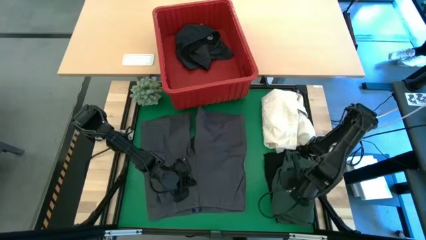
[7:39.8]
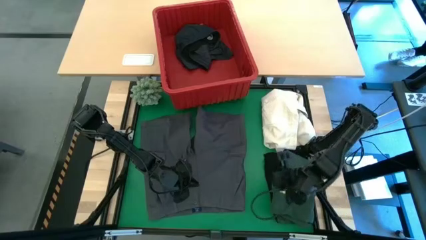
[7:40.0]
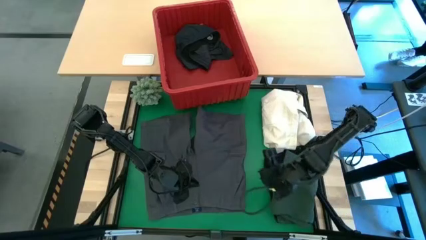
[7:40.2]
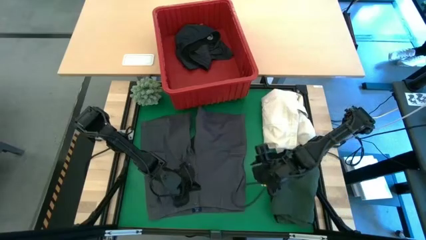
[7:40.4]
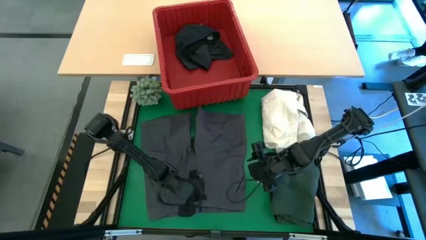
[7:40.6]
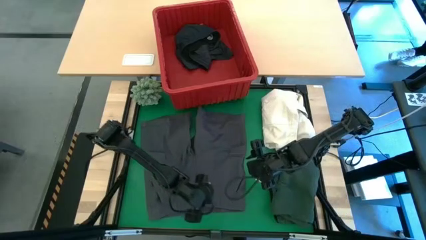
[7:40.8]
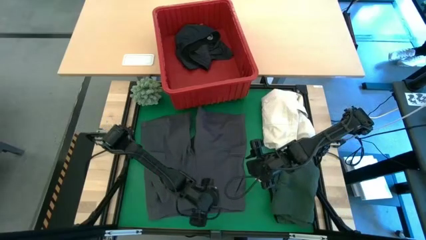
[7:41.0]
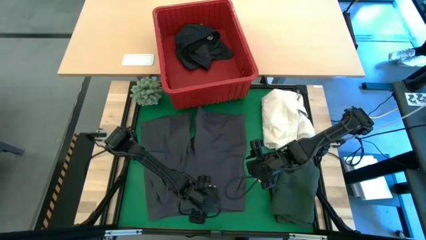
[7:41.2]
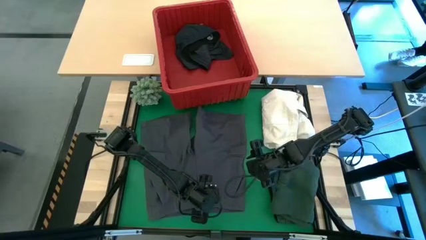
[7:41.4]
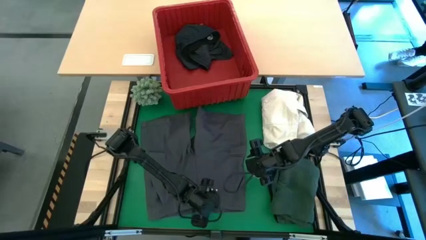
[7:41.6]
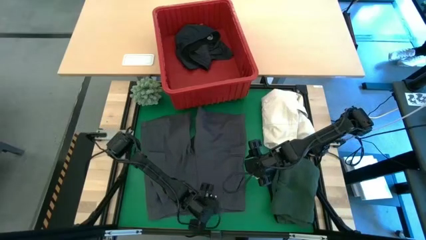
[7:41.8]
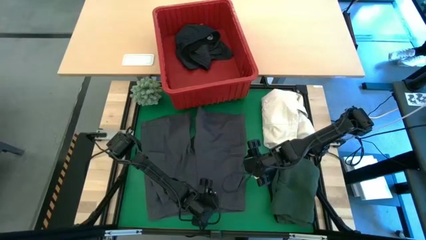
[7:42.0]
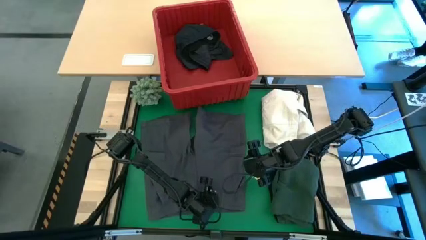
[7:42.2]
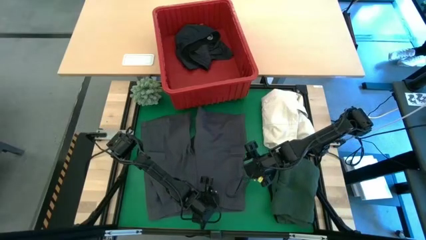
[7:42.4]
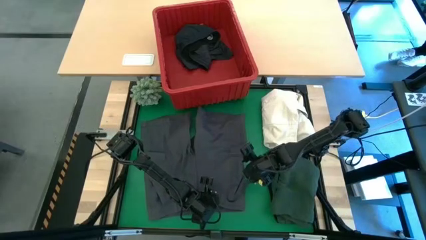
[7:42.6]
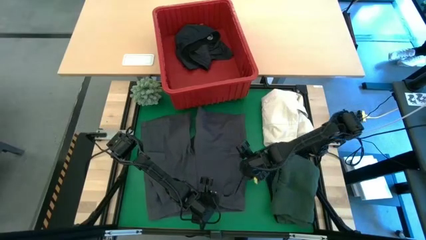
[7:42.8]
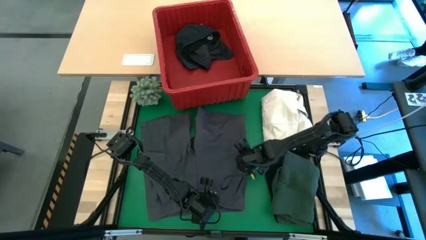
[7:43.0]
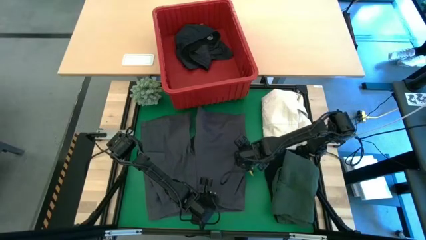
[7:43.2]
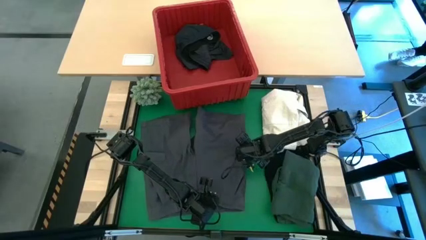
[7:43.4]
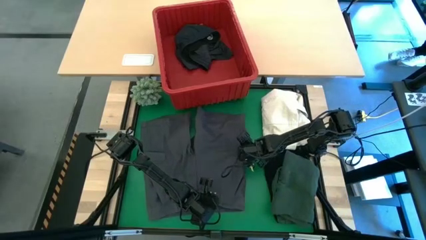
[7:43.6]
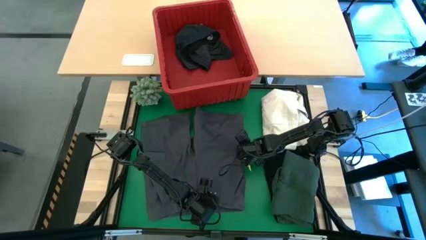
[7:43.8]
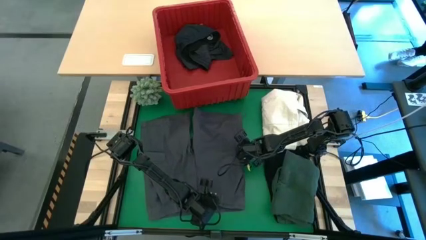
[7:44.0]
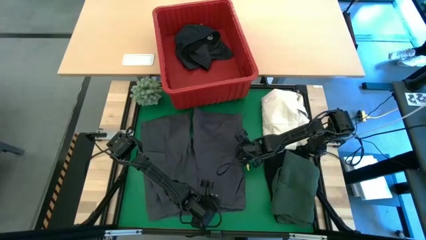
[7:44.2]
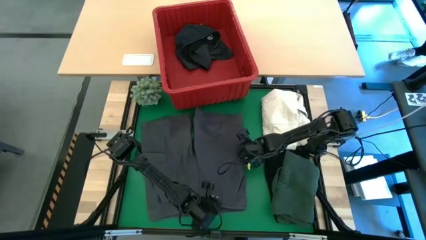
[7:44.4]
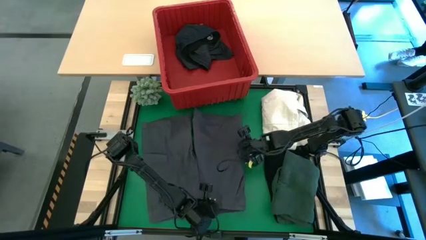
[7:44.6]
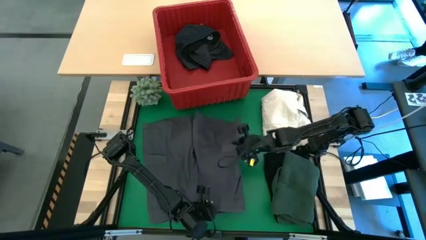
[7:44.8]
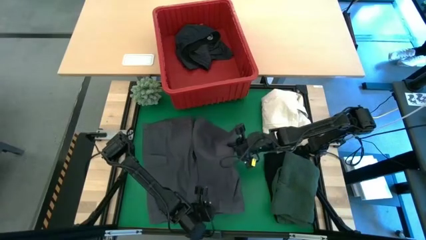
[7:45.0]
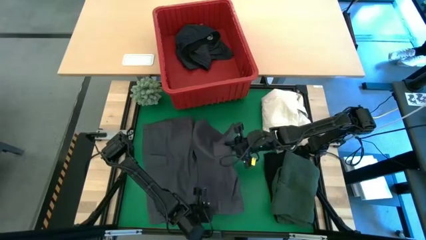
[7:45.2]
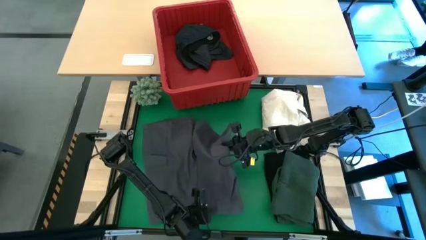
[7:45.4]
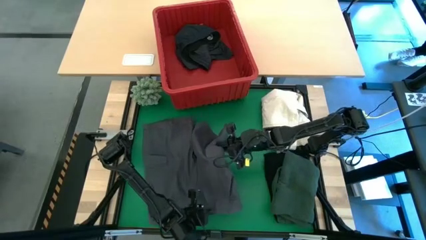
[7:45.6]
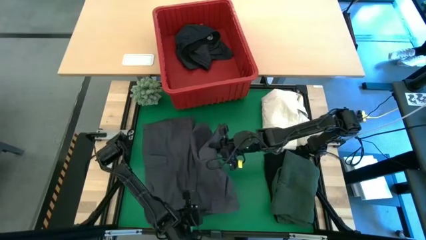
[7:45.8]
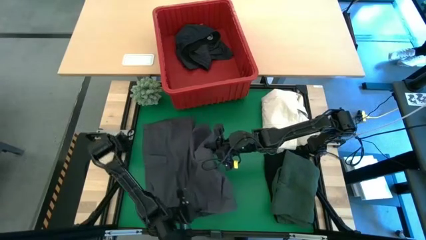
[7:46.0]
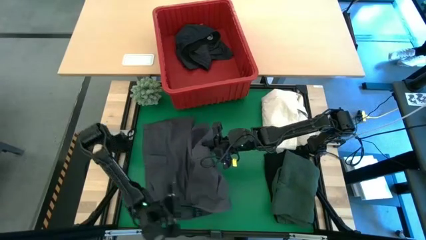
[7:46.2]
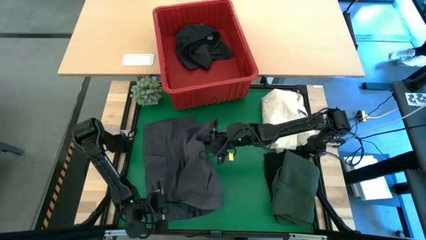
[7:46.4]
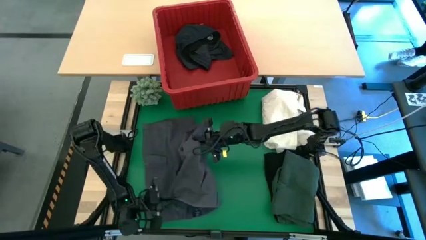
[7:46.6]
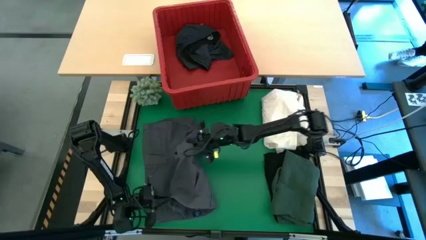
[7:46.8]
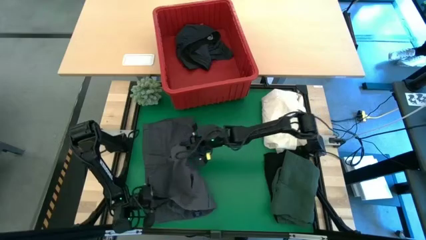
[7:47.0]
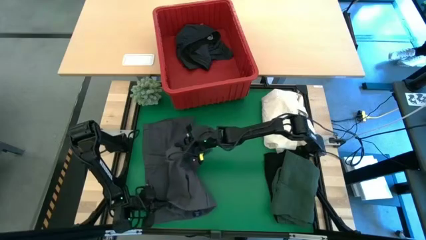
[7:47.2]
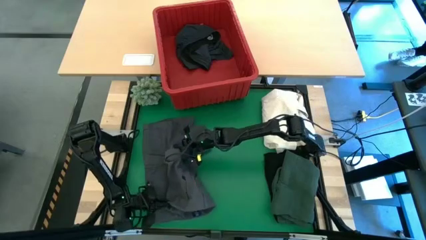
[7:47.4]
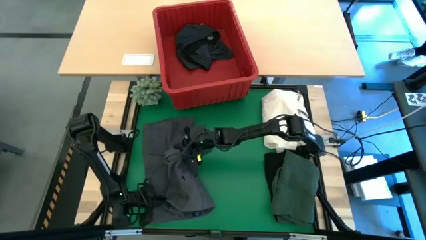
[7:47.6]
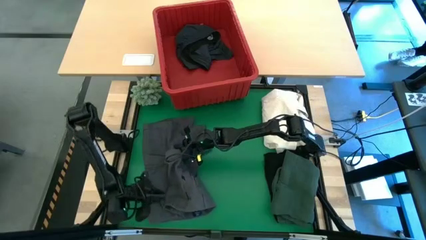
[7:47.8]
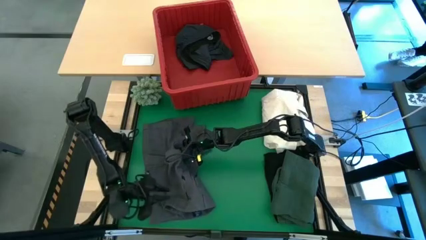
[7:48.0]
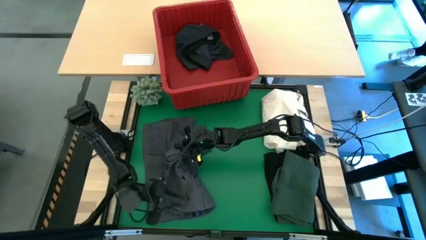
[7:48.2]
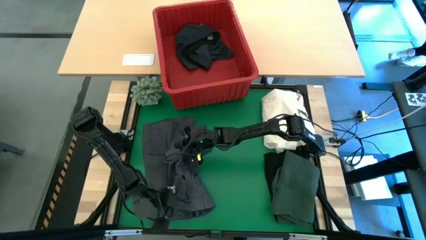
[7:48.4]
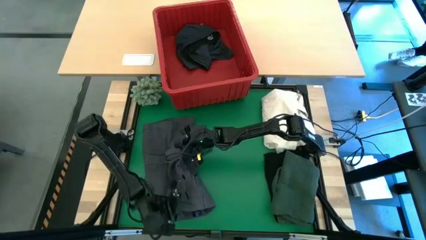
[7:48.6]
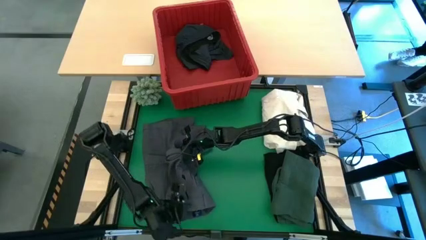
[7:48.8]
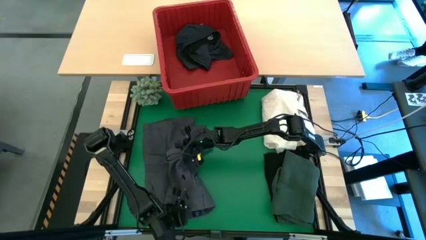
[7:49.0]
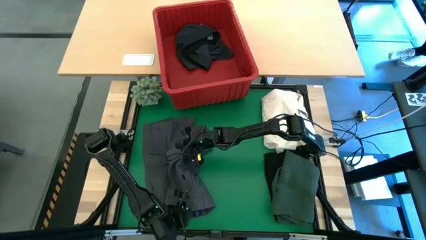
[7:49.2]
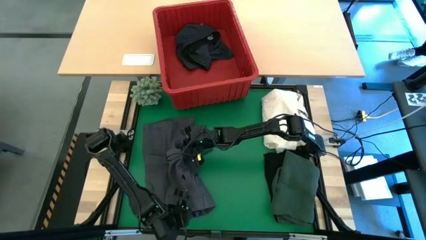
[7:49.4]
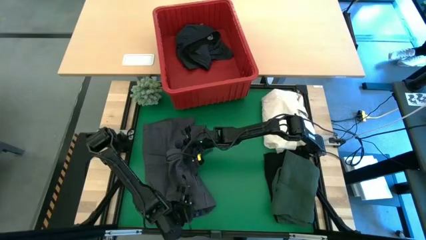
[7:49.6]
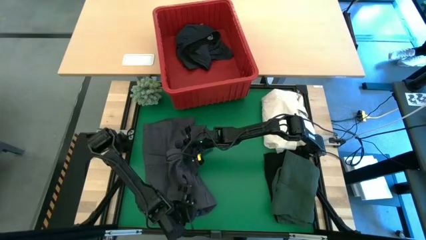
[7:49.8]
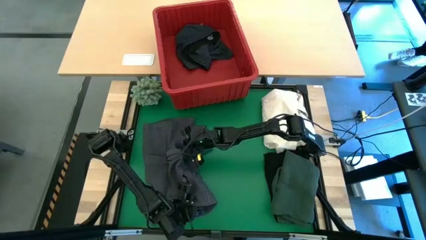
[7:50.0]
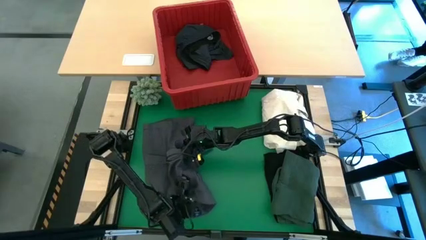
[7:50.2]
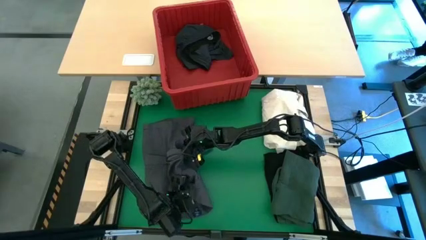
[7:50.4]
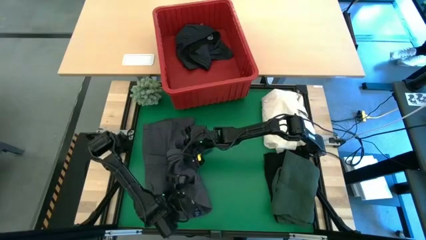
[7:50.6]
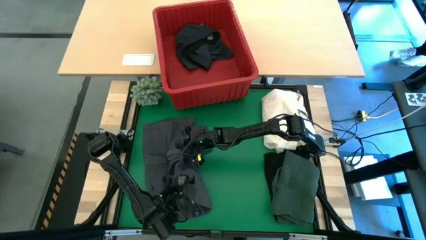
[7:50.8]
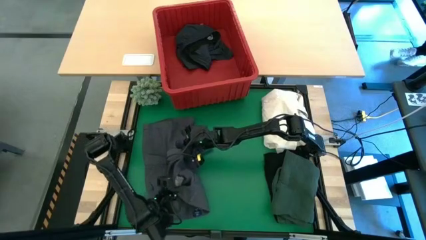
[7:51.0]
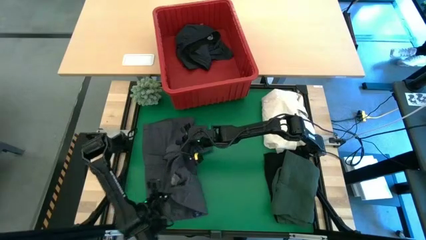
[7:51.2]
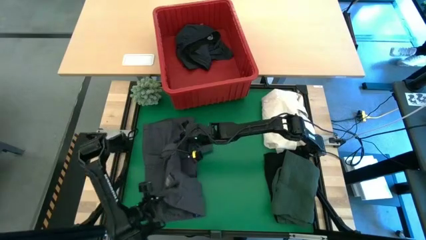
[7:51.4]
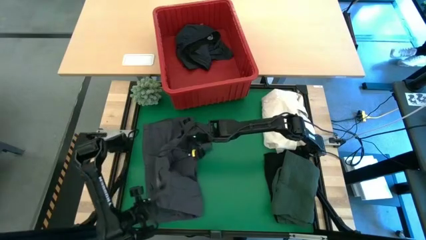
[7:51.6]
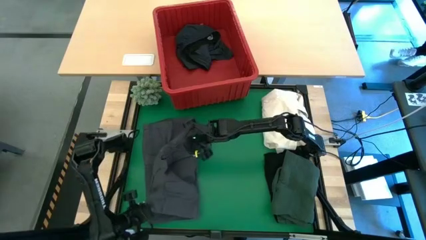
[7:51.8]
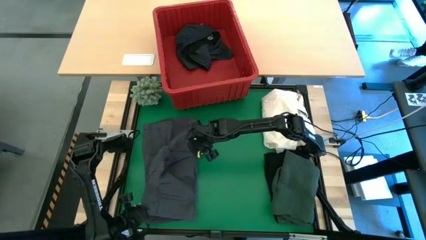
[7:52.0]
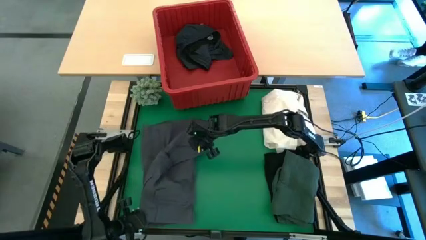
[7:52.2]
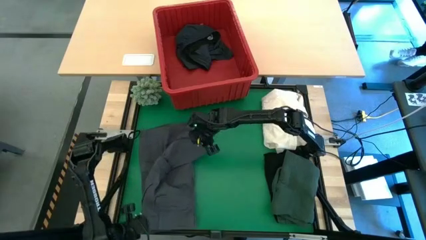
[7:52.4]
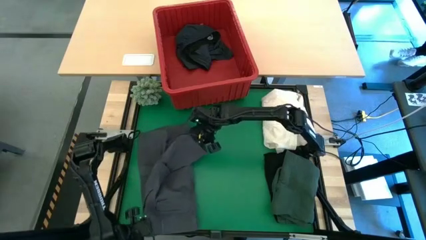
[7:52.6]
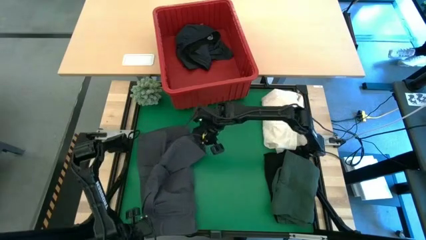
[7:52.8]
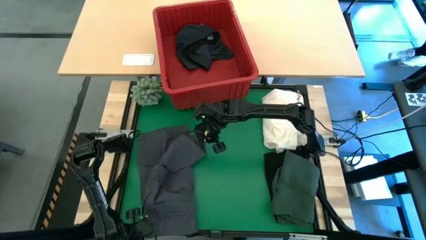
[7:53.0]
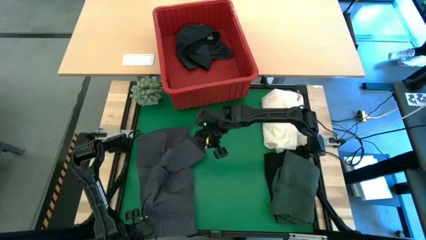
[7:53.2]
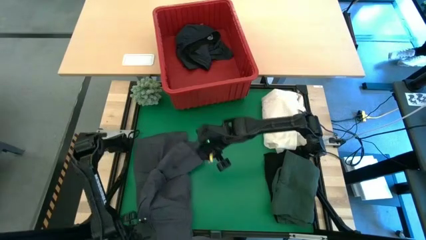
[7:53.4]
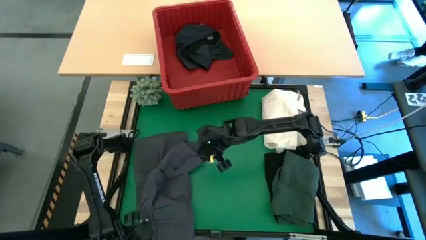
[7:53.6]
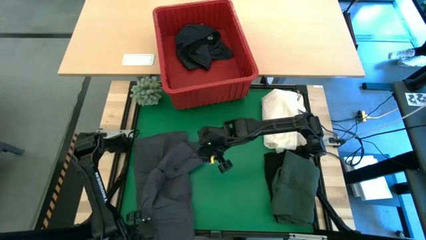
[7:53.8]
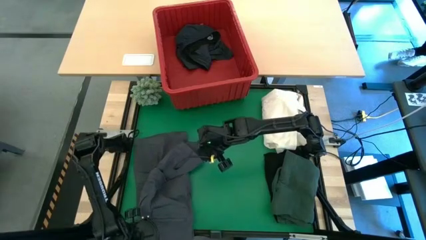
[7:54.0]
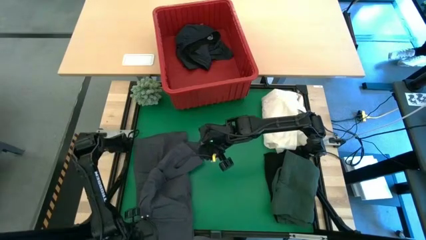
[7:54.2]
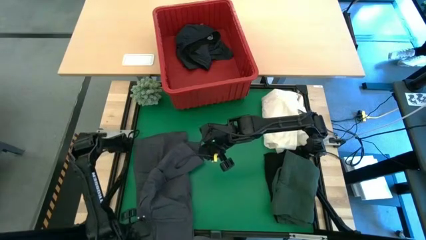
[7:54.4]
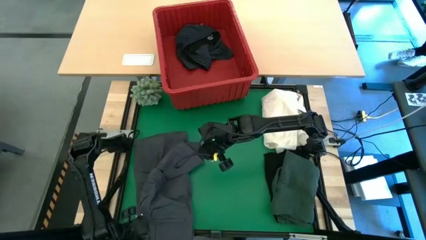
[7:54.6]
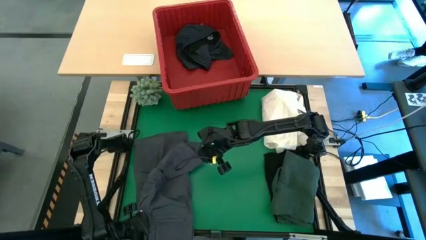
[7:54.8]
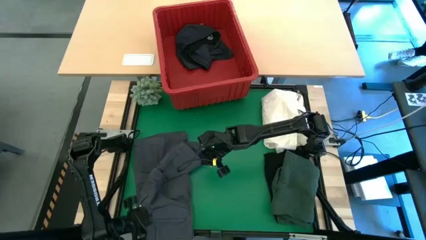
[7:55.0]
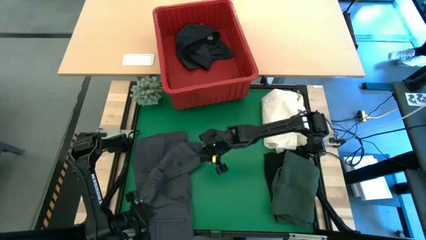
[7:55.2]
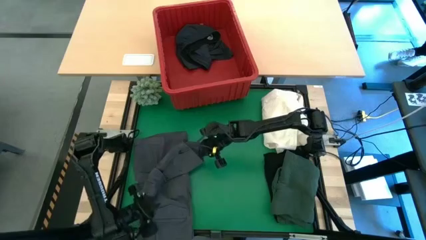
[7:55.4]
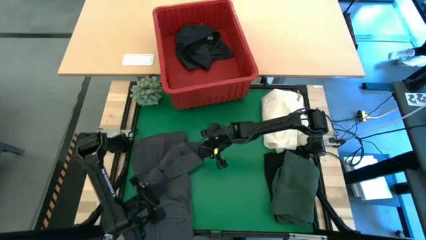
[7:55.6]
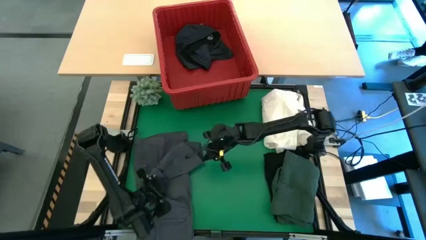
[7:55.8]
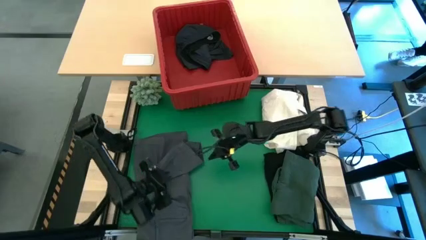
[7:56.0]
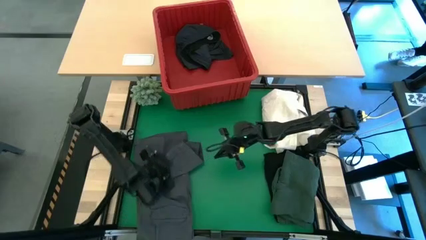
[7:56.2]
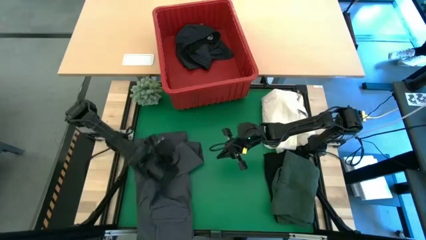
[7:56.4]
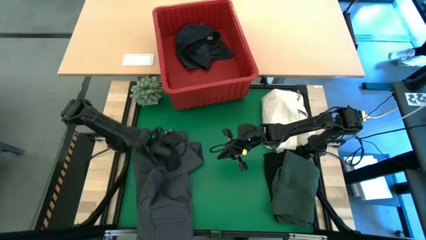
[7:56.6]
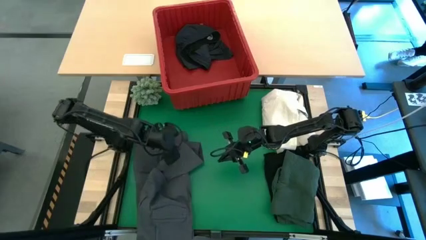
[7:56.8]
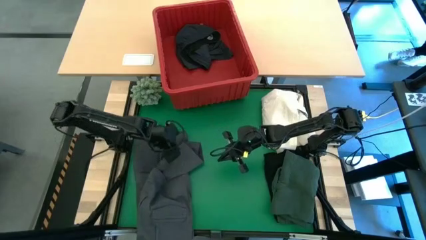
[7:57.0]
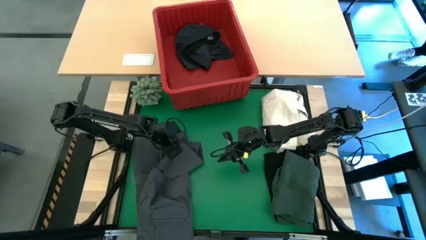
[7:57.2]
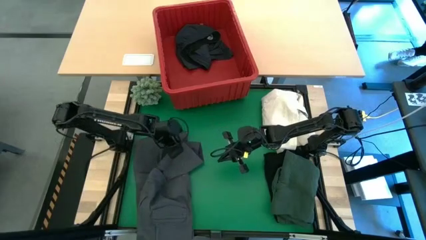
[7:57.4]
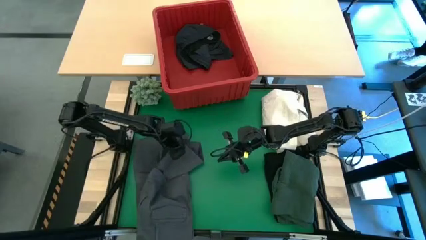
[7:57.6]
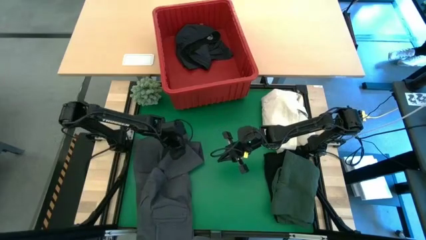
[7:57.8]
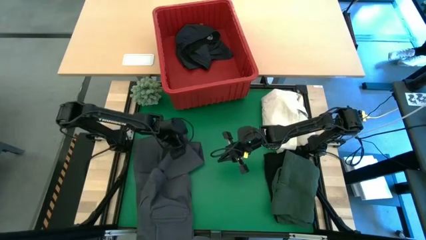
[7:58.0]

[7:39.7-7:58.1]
Task: Fold laundry
Fold the gray pants
